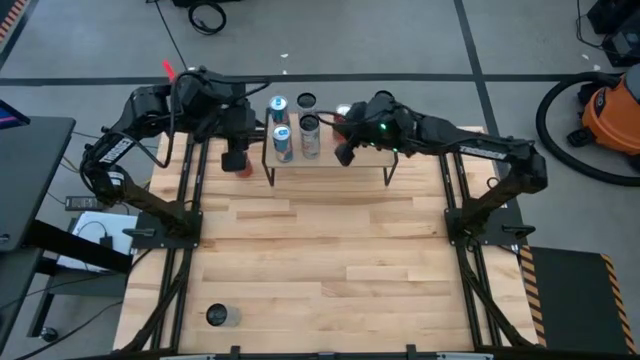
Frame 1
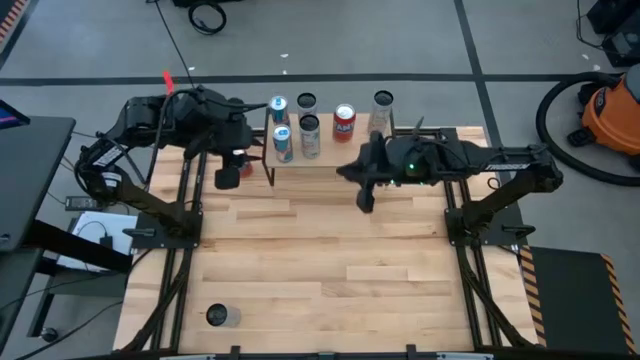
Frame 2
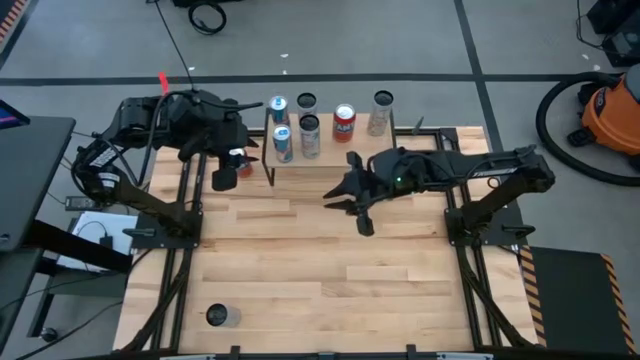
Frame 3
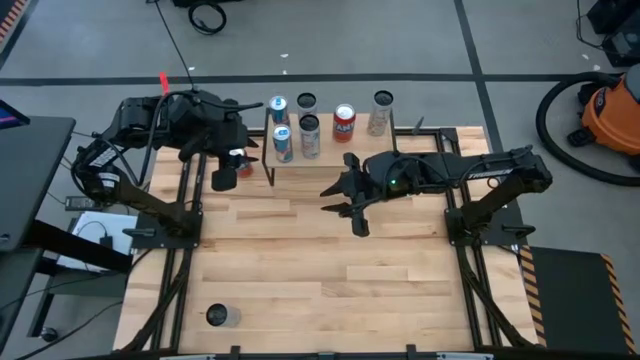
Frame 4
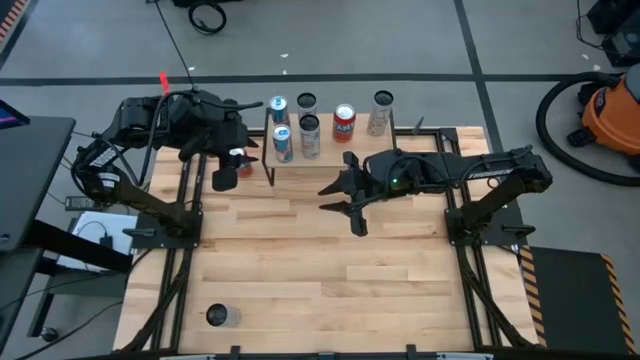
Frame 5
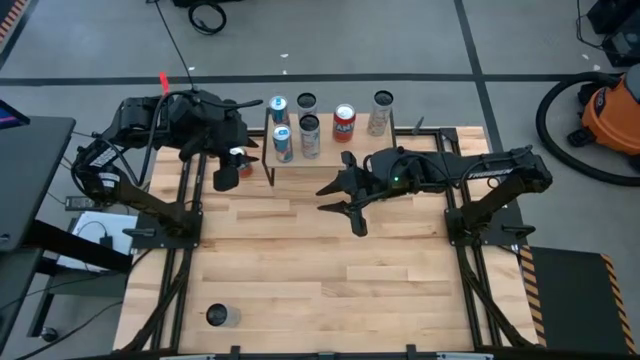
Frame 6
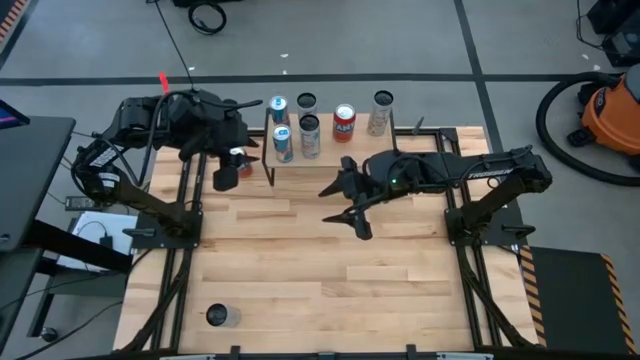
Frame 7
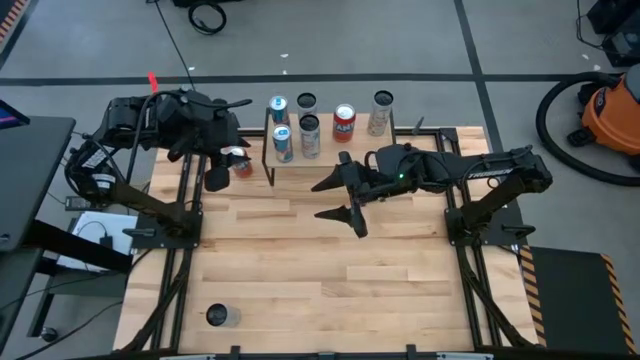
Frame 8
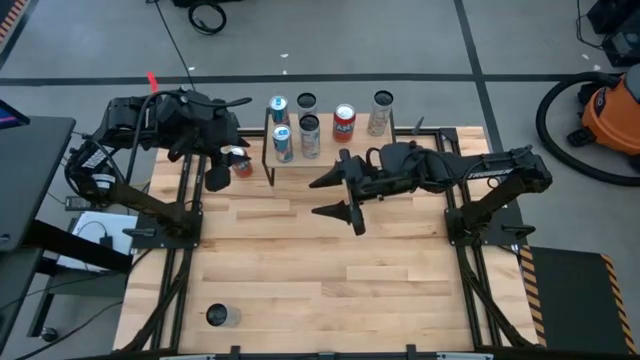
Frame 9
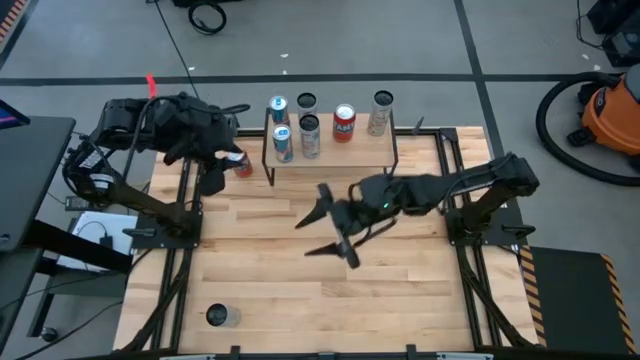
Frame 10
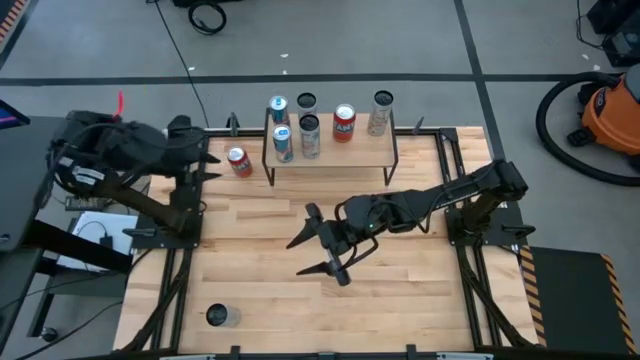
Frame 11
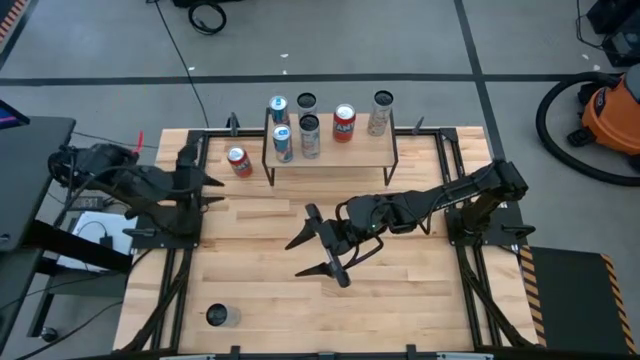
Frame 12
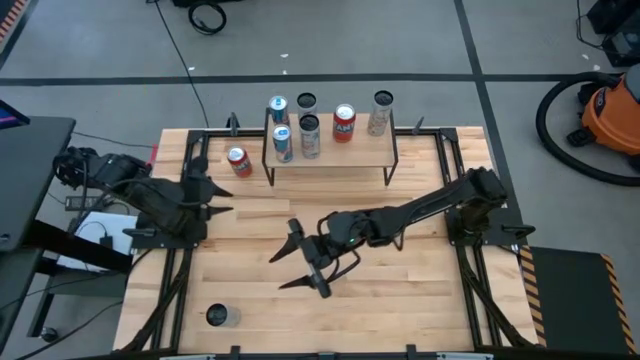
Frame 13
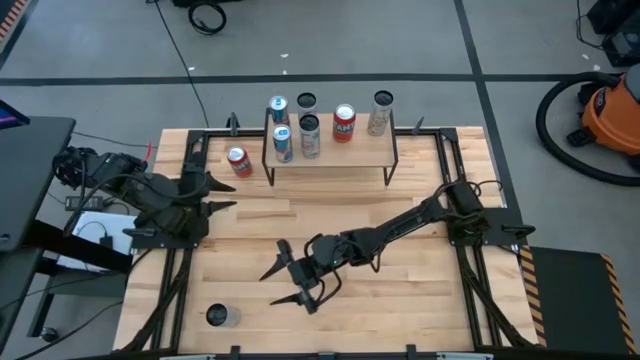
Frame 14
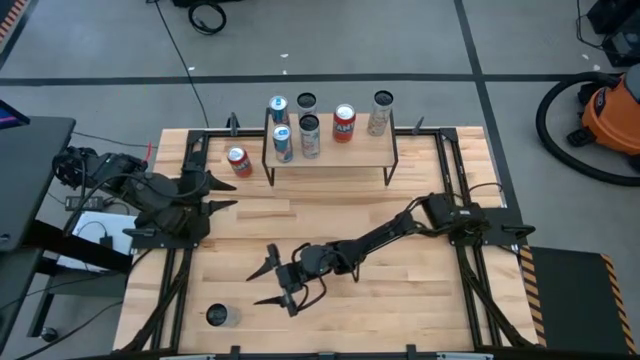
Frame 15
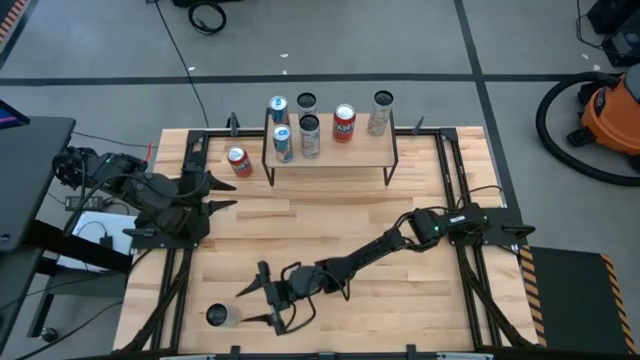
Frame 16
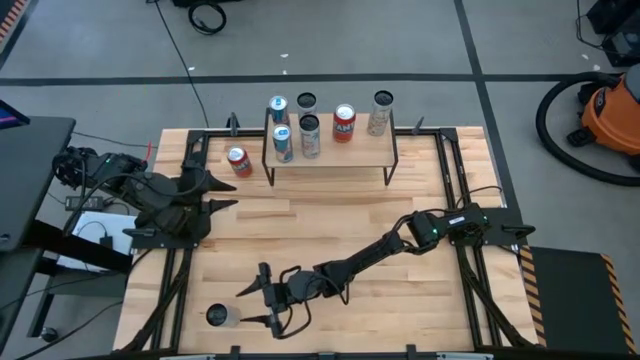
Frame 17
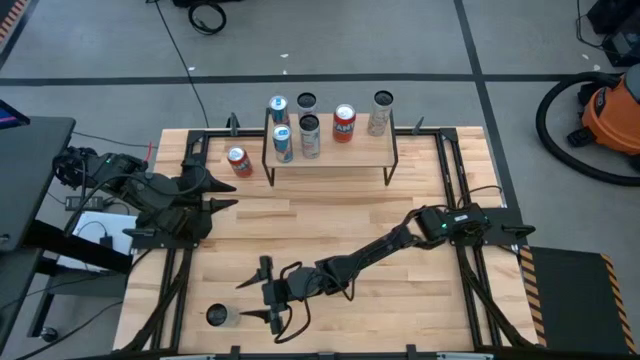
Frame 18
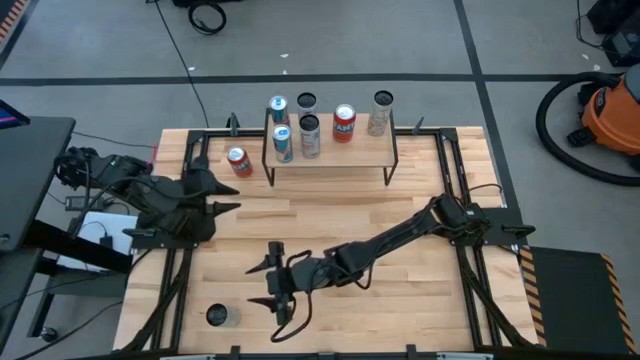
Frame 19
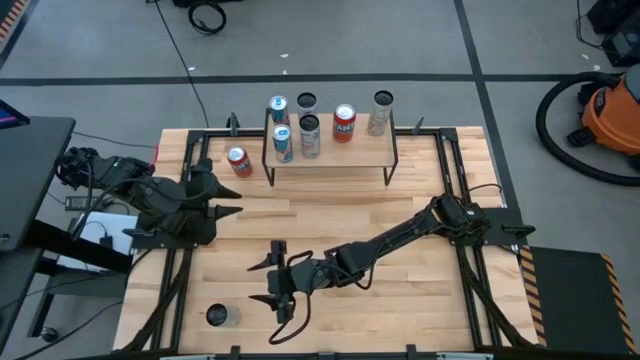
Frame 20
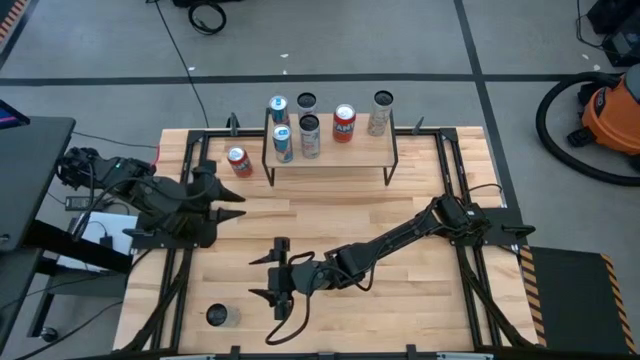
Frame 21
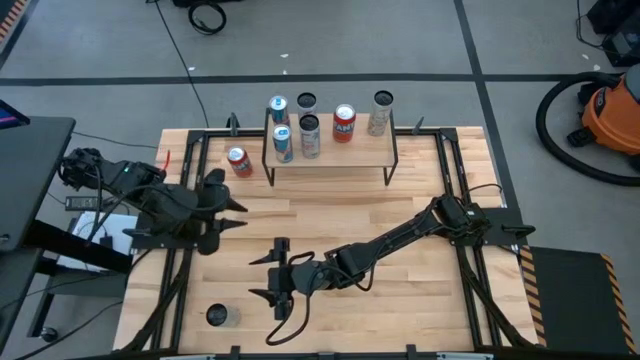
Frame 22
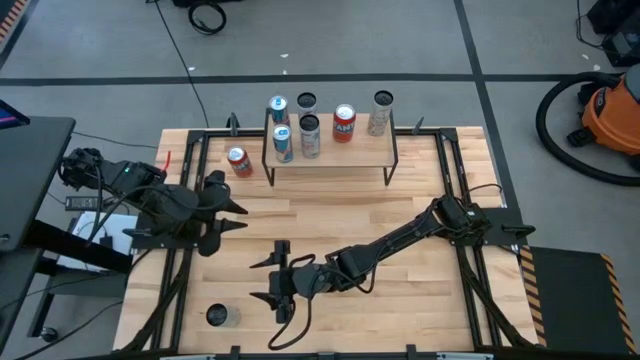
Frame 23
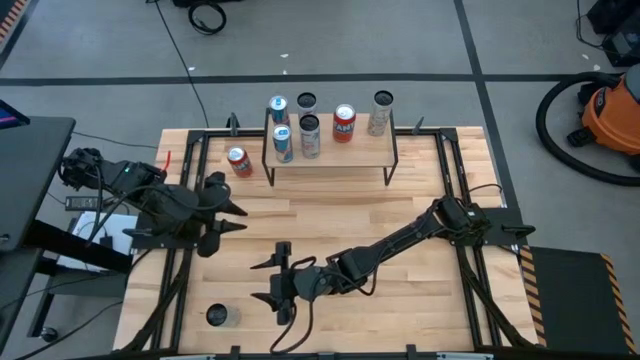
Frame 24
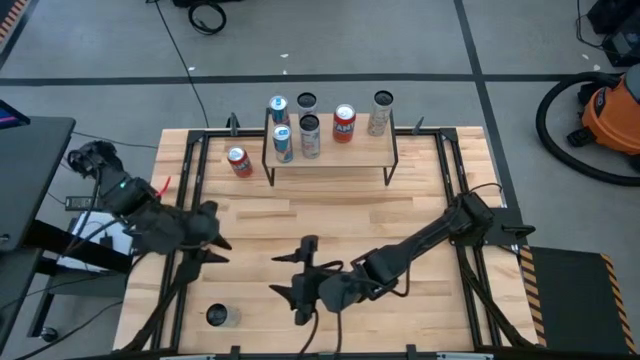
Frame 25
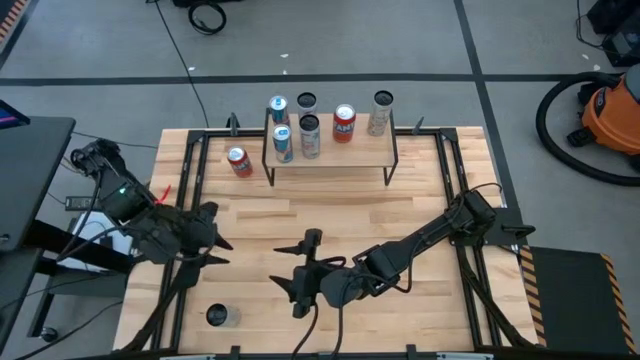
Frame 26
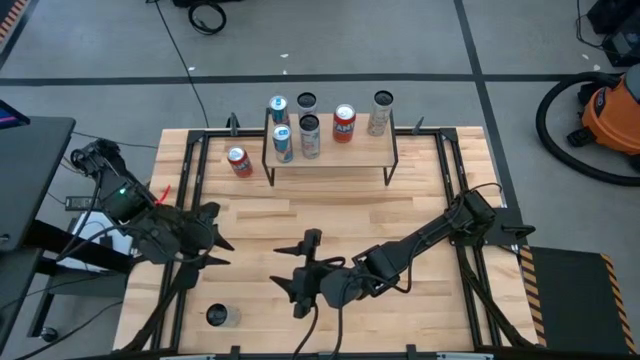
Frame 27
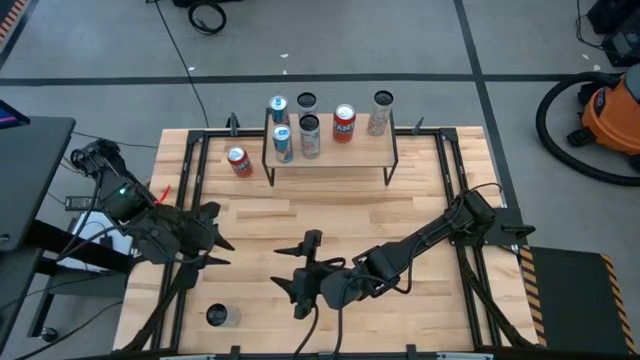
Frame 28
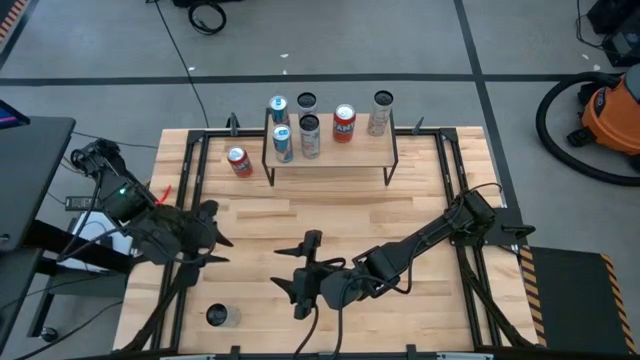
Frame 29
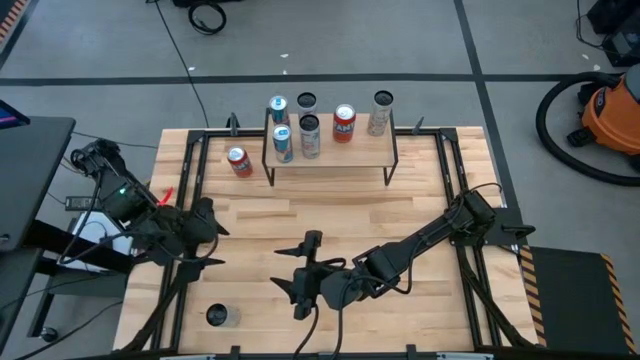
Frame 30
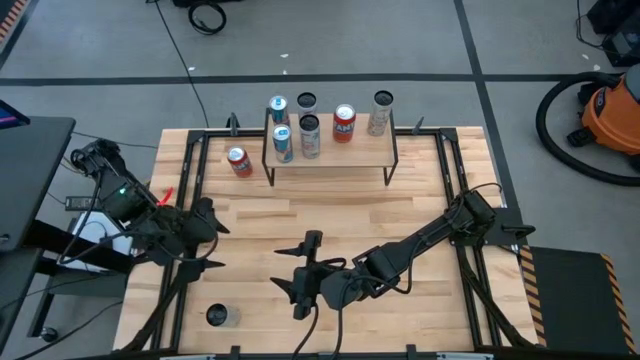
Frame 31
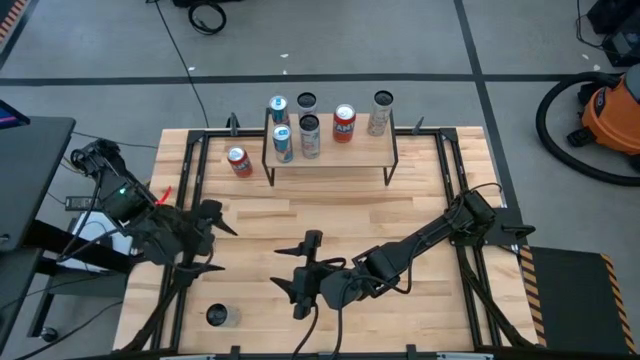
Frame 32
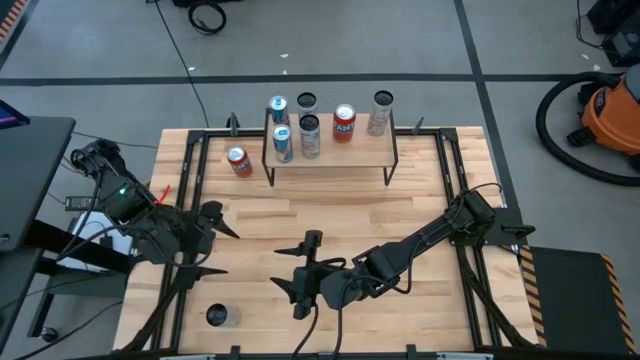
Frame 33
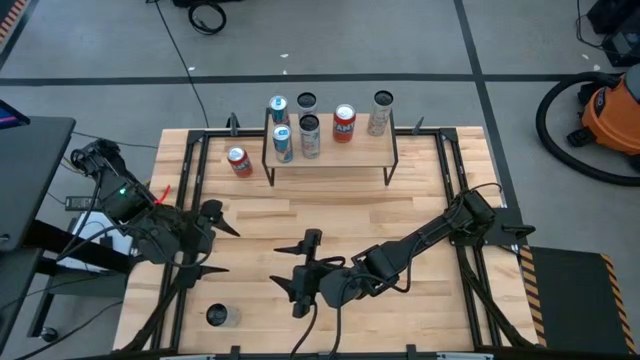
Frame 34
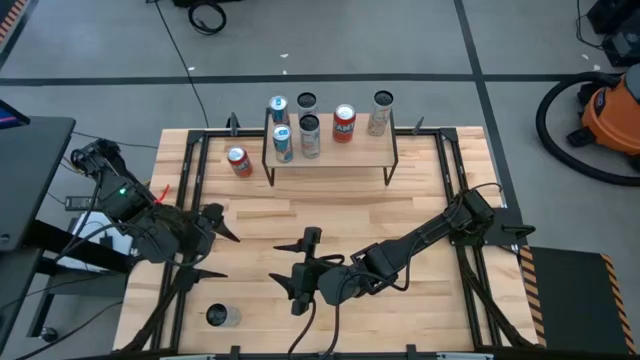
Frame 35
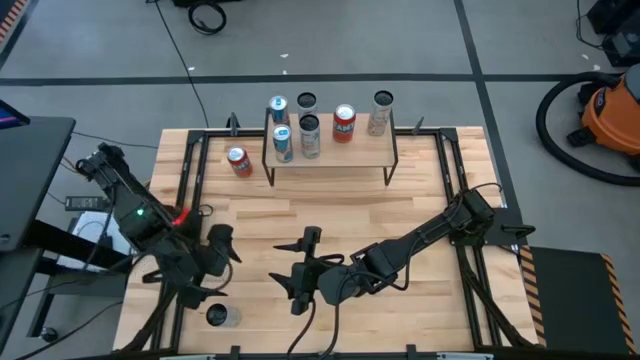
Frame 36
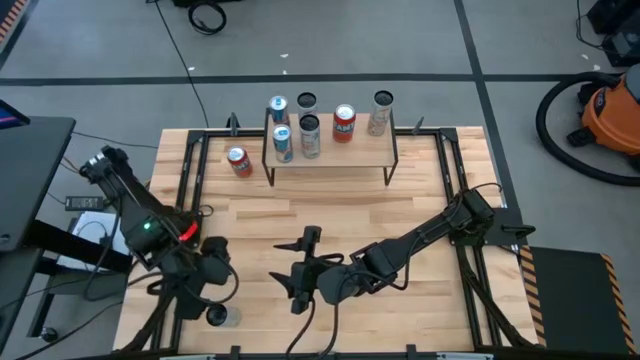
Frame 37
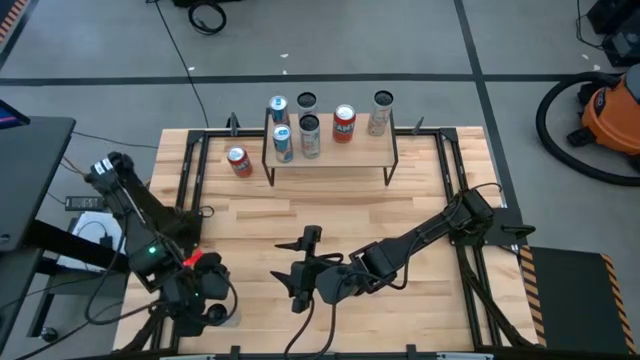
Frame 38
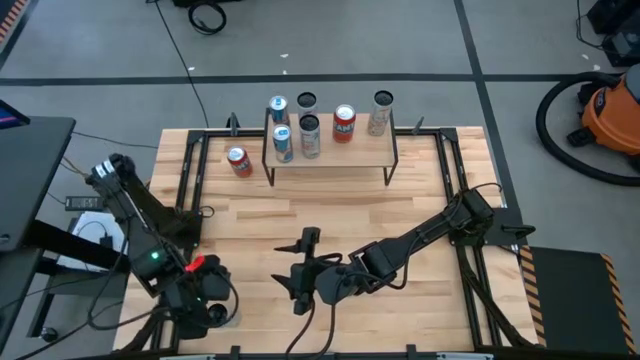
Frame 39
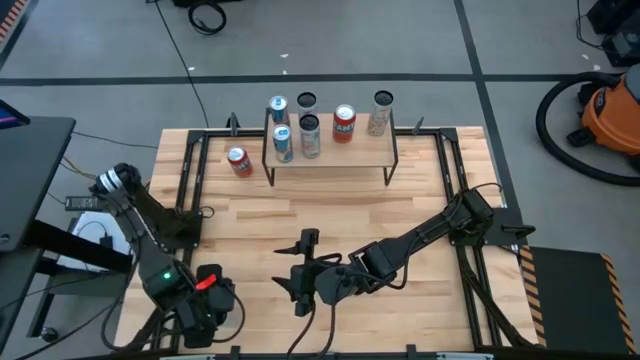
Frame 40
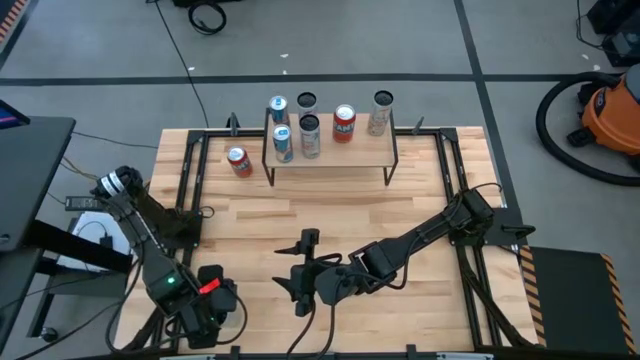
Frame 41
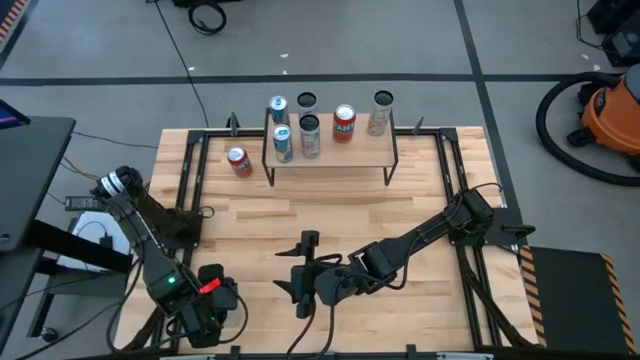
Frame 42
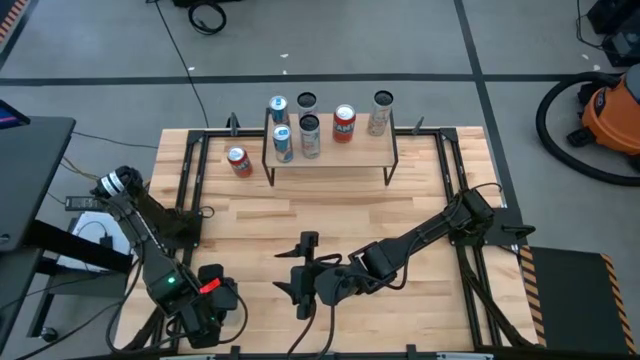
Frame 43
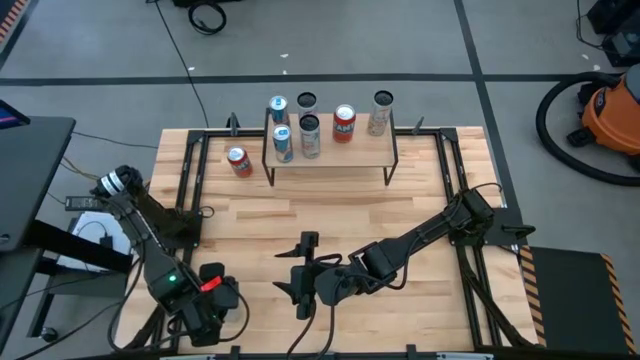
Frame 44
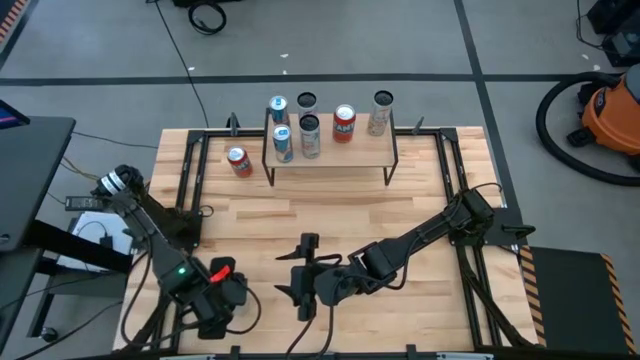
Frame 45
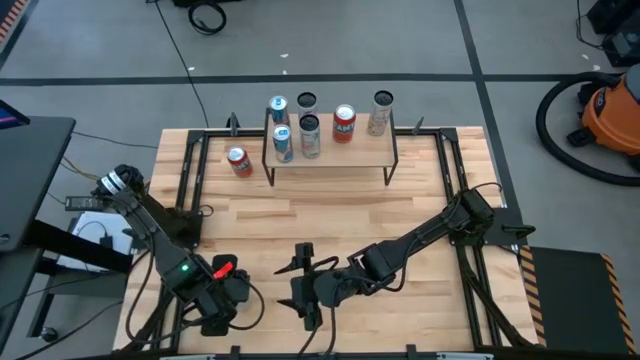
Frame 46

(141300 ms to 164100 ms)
Task: Place canned beverage on shelf
Put the white yellow soda can on the shelf aligned with the other white yellow soda can
